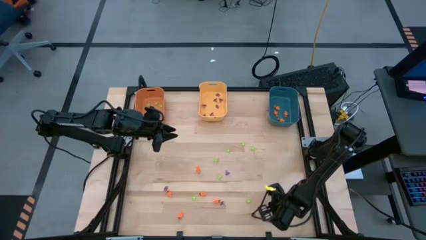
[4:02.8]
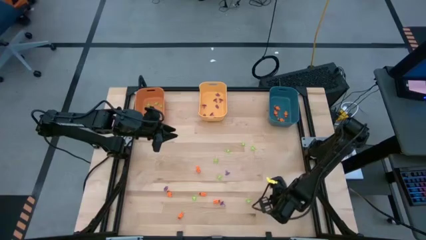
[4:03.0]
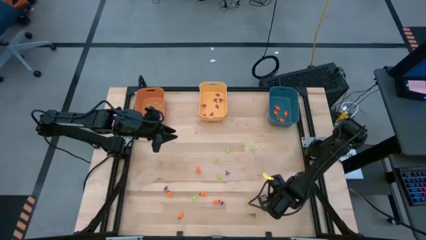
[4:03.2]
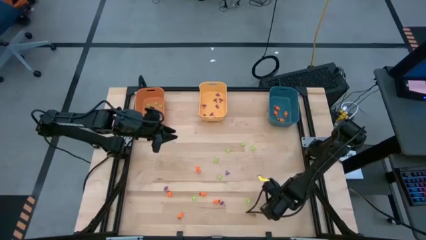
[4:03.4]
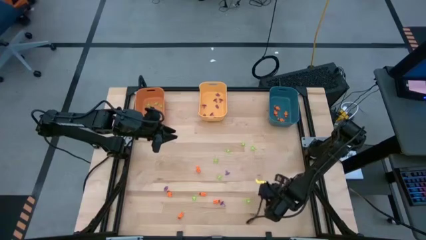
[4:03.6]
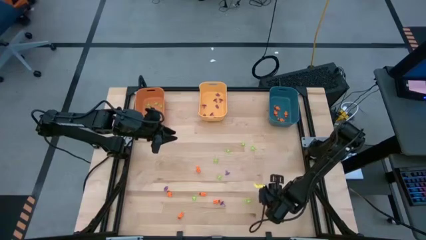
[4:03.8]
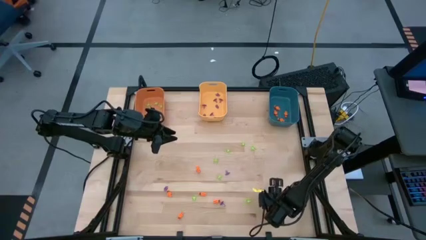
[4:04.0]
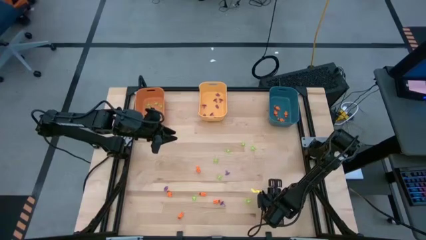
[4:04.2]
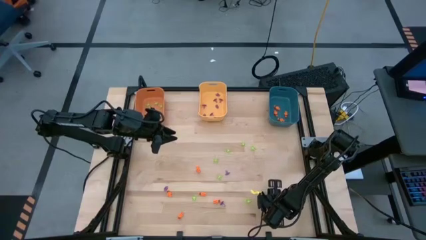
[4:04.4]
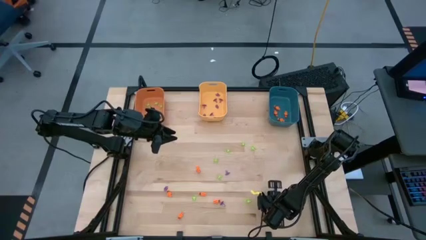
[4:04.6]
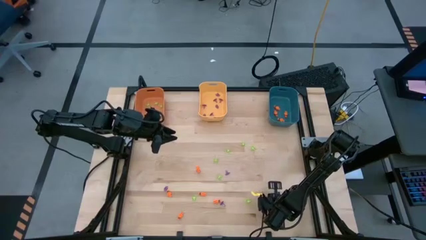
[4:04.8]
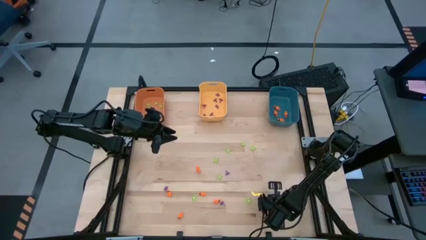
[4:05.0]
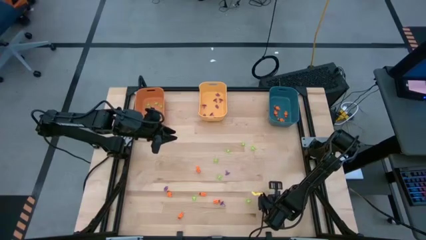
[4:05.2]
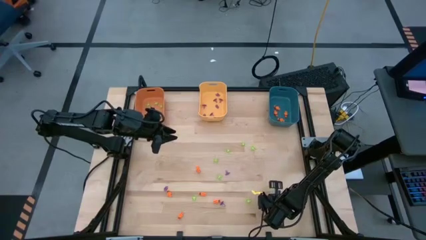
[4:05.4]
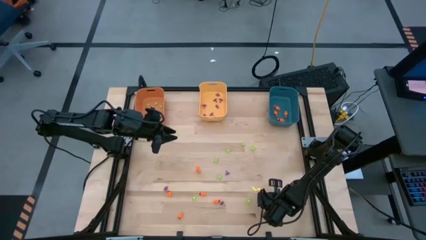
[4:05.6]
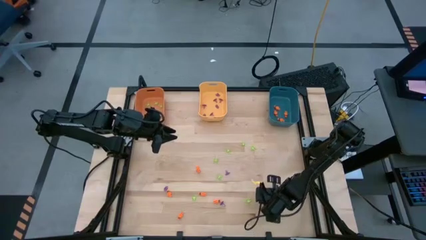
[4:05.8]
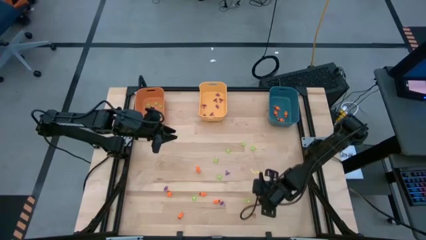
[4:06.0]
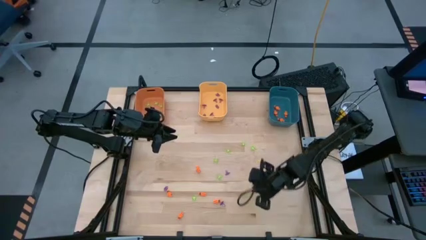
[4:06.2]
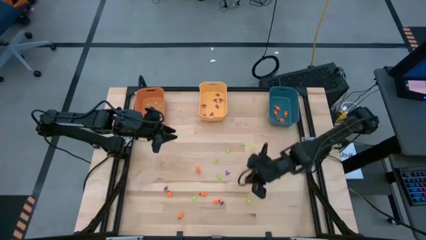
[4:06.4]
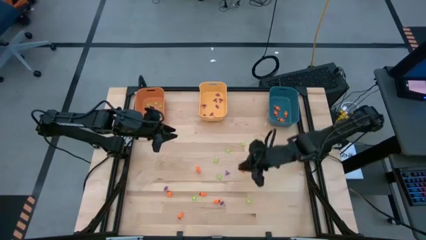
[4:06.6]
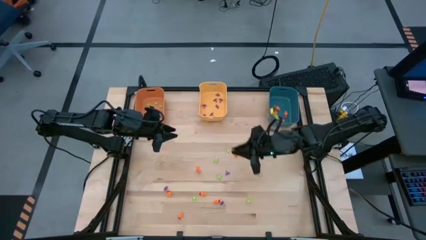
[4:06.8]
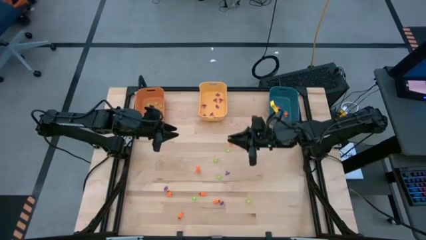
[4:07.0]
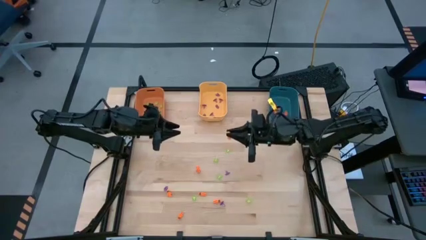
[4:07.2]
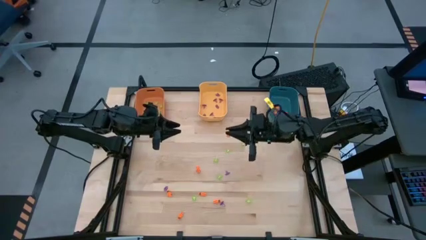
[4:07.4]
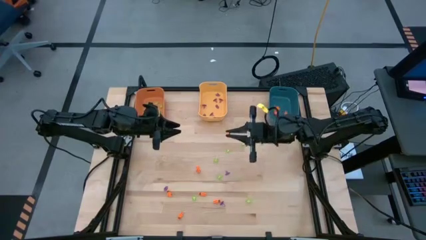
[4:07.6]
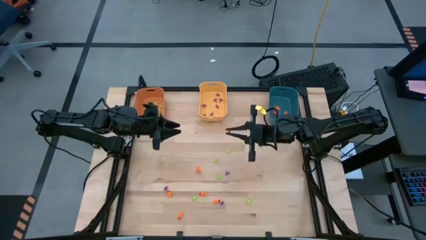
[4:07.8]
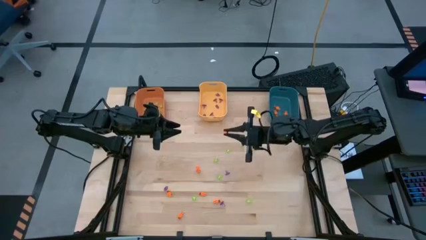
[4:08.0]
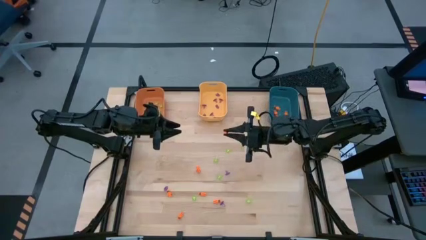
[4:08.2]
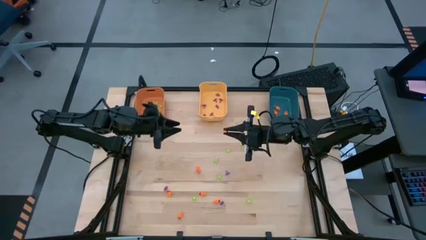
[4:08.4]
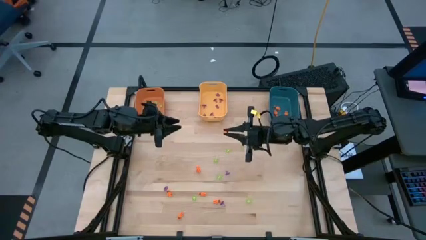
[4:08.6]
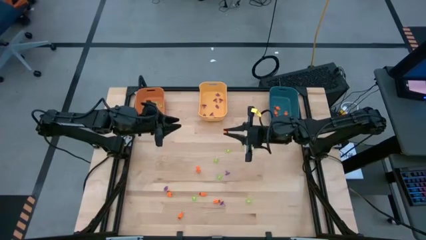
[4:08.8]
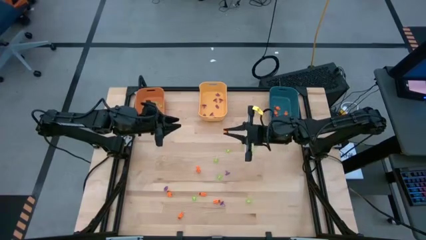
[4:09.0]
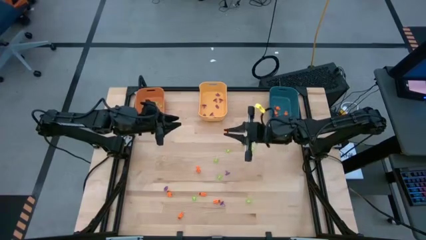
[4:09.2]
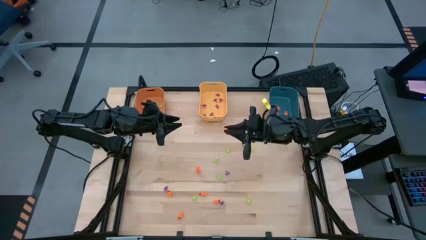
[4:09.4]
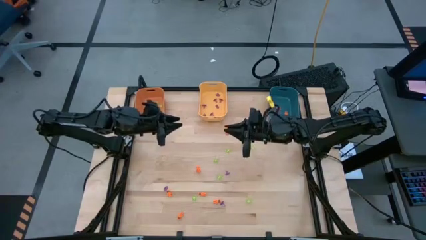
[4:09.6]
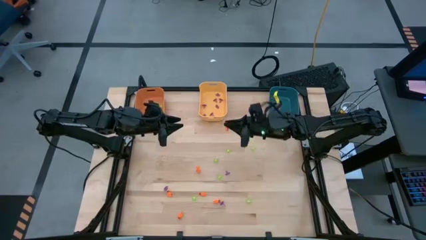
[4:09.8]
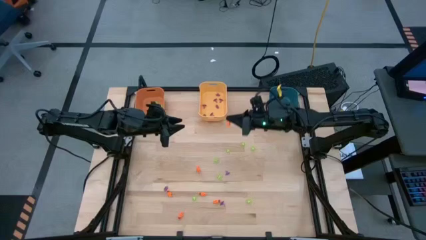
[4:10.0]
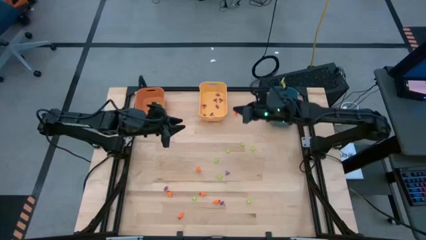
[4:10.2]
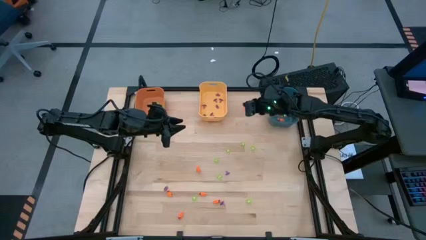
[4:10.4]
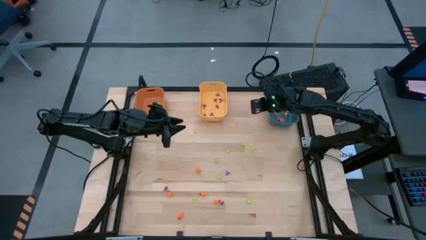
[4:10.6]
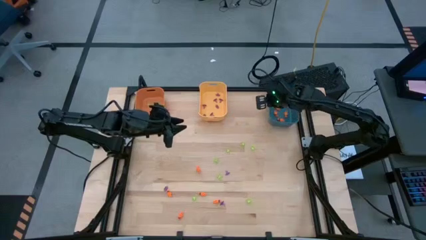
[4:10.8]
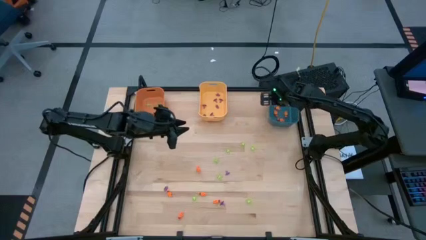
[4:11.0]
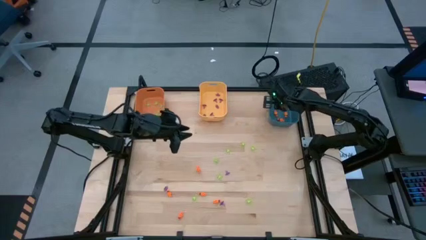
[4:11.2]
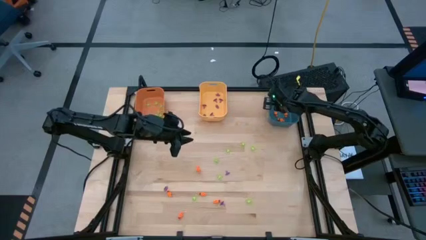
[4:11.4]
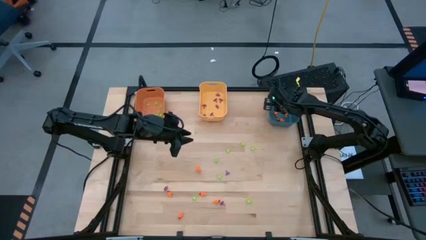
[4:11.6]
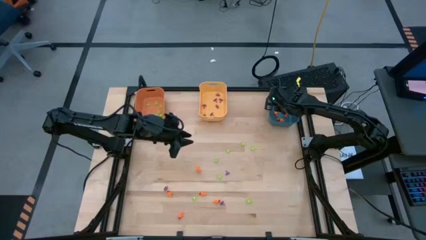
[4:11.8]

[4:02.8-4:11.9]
Task: Sort Halloween decoration
Put the orange skeleton toy into the blue bin

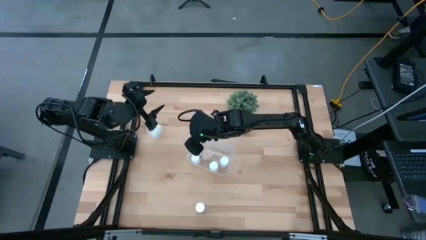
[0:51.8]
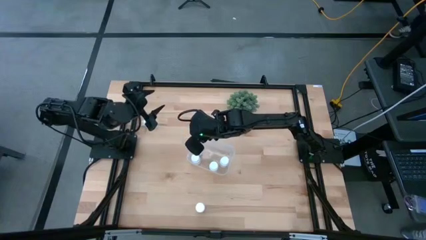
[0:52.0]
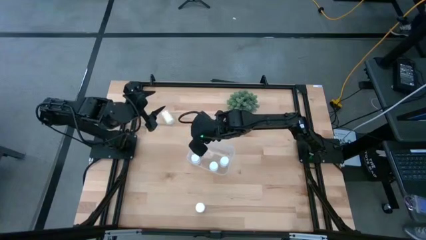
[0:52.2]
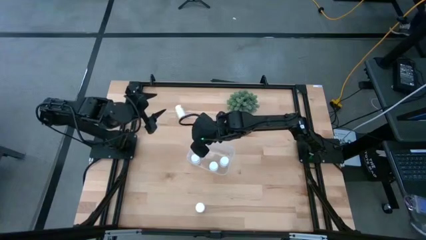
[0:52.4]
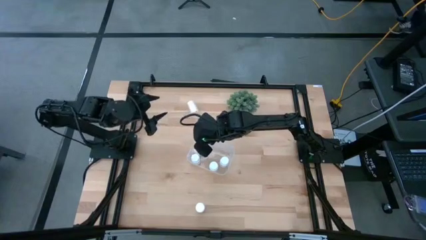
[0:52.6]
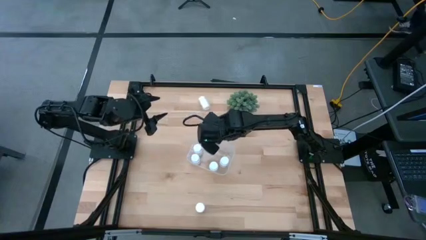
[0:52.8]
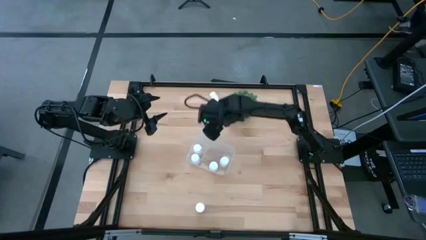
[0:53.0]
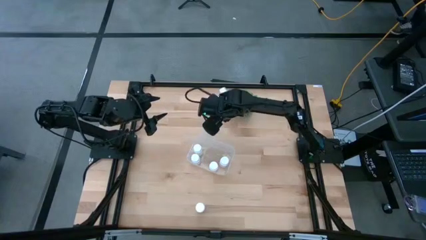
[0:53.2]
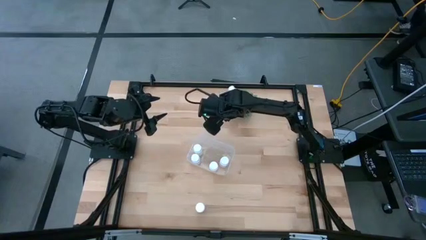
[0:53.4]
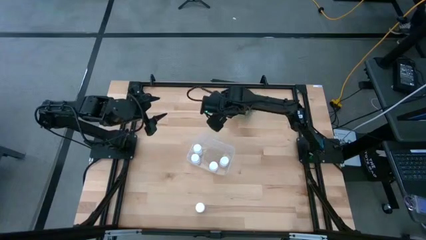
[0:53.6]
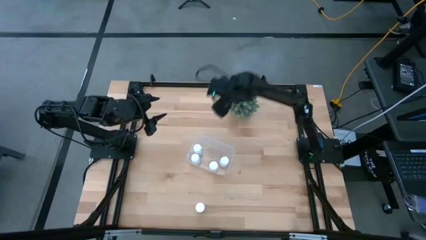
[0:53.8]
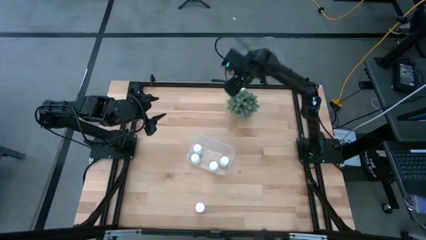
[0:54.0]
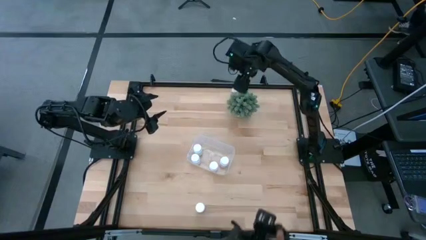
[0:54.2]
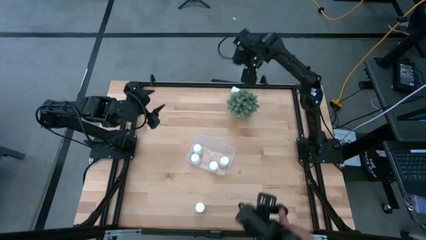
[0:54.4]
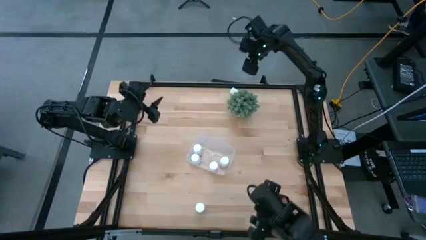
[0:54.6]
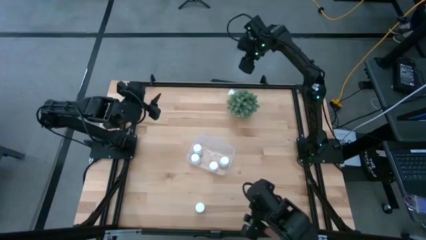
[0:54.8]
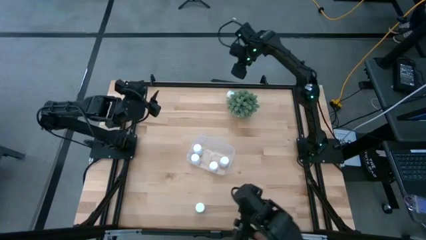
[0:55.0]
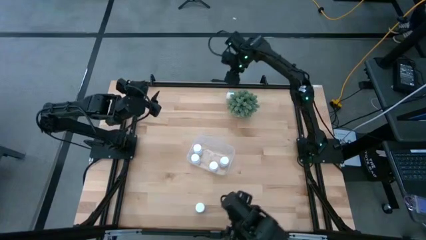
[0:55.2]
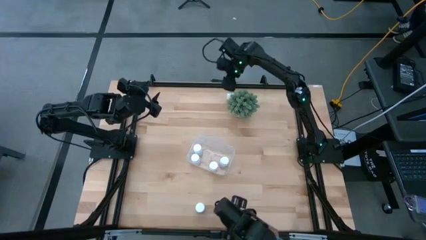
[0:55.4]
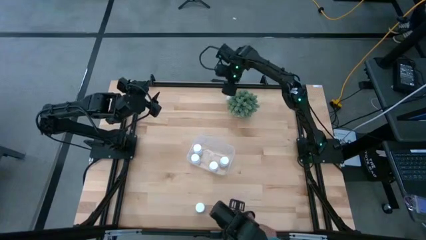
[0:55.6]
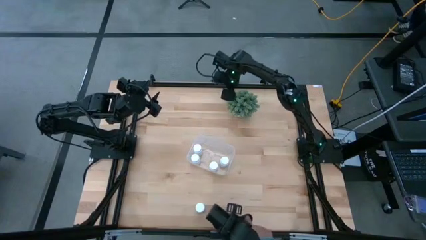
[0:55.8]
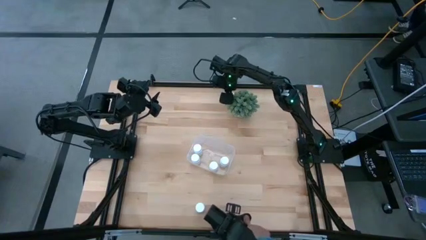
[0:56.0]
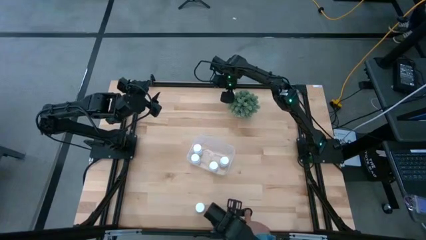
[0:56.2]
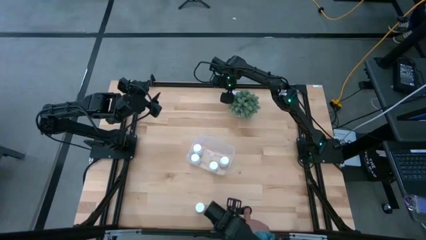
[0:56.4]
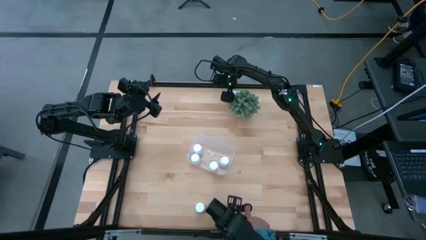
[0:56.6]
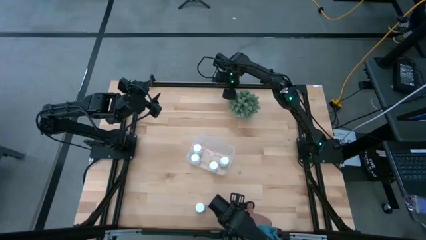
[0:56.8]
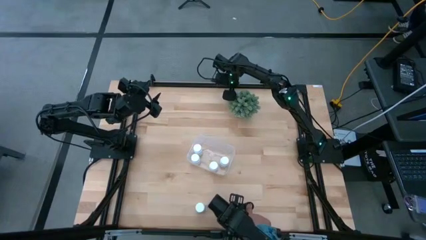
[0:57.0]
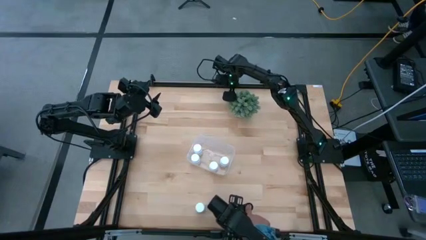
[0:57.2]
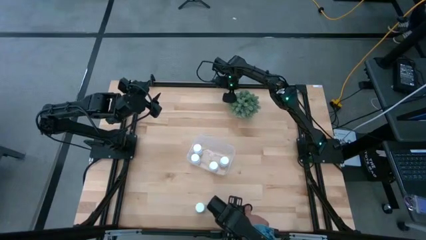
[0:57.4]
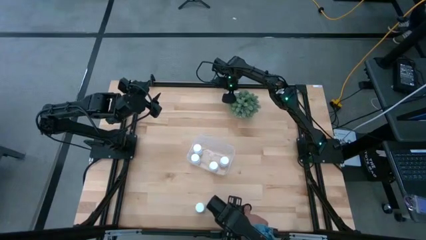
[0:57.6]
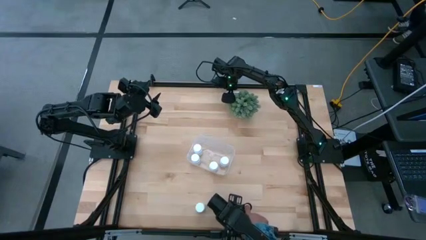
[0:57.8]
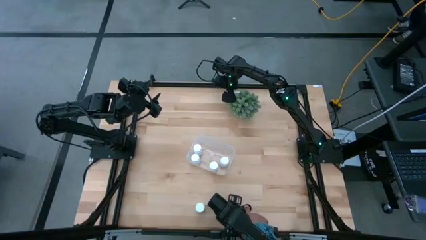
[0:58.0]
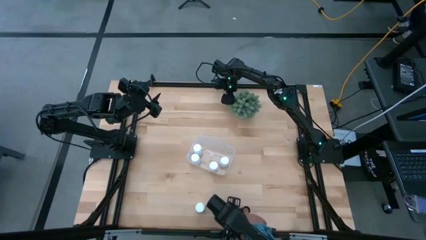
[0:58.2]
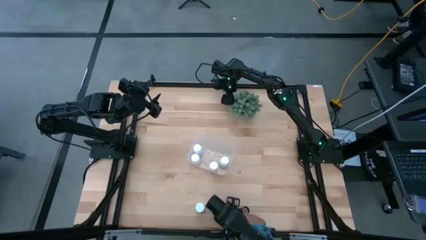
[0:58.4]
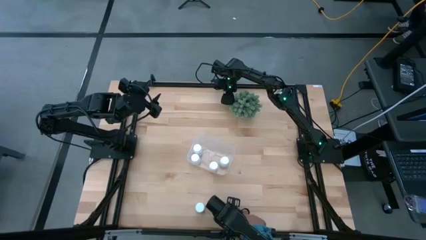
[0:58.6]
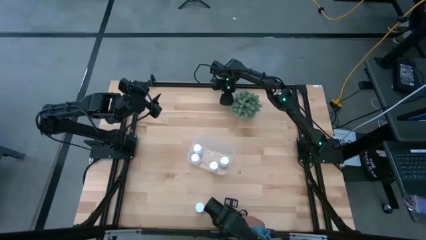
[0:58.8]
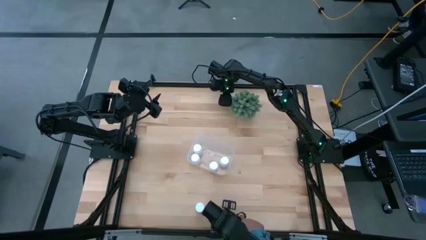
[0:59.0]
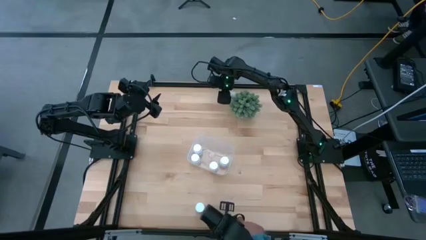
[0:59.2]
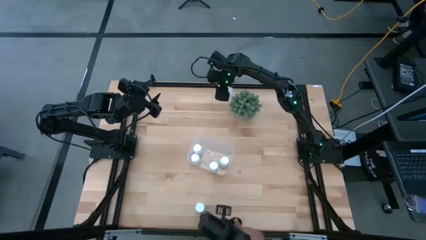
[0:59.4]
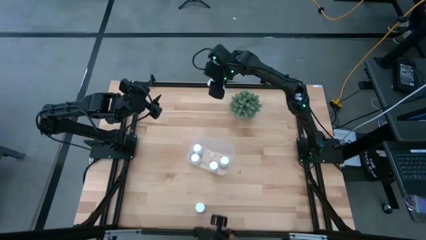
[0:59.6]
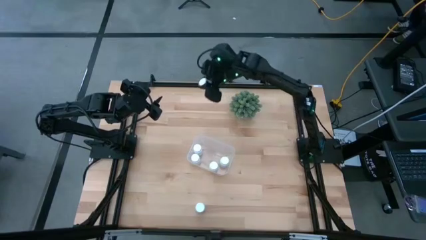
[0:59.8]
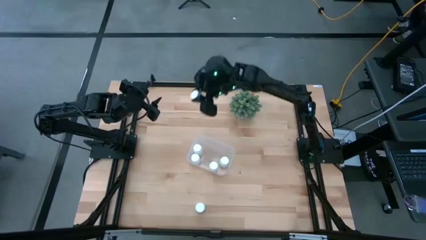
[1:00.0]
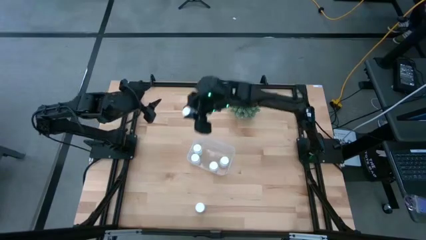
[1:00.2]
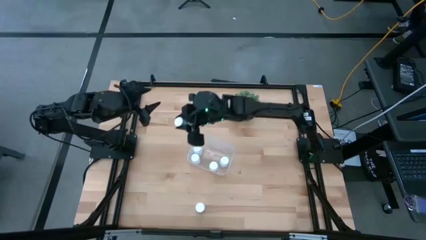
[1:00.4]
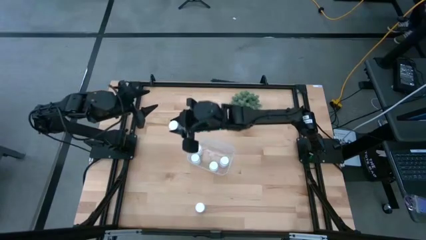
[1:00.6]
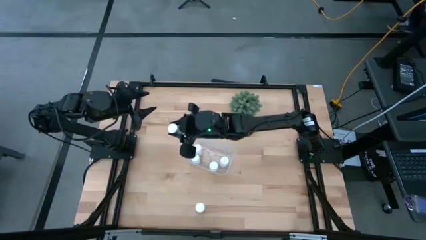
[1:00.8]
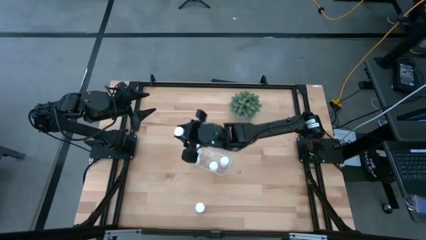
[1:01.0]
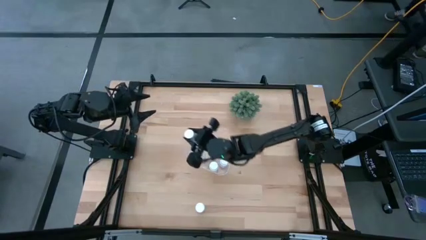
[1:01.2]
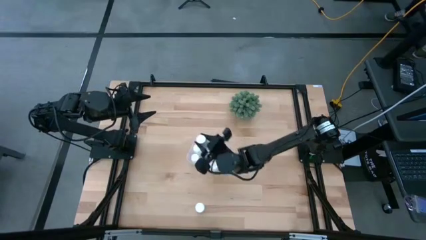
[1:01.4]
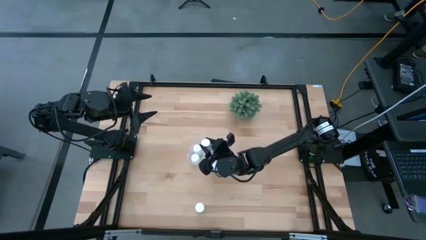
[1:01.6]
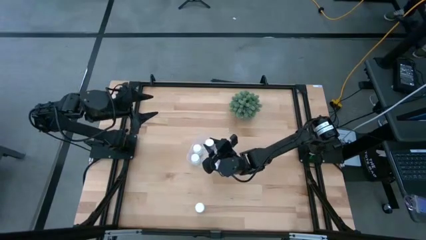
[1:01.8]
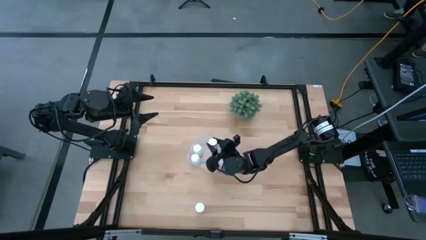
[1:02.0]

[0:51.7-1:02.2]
Task: Pick and place pill bottles into a basket
Put the white pill bottle into the transparent bin
